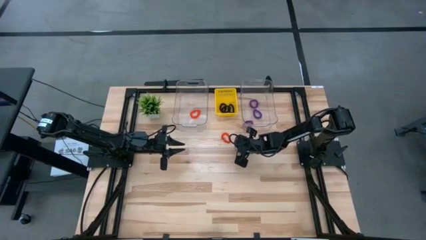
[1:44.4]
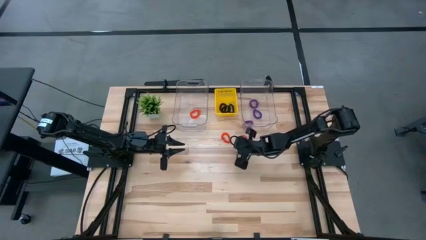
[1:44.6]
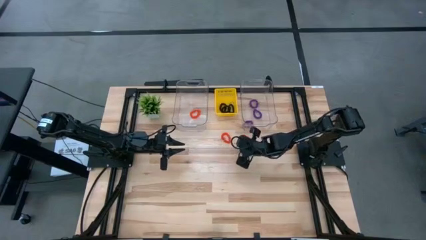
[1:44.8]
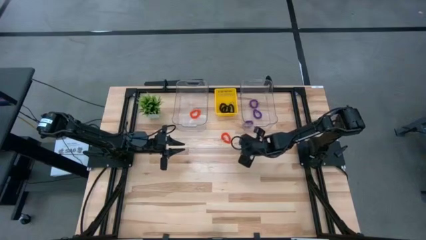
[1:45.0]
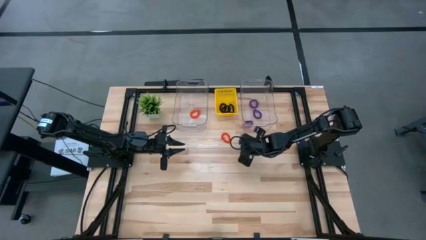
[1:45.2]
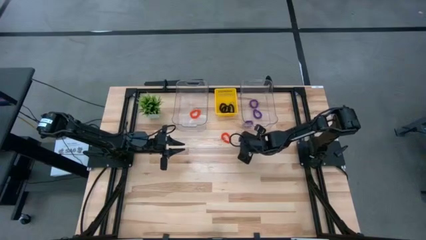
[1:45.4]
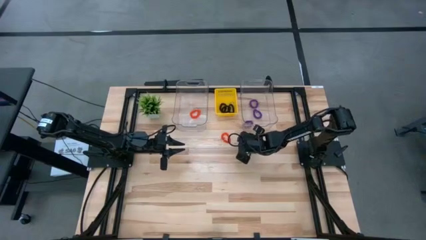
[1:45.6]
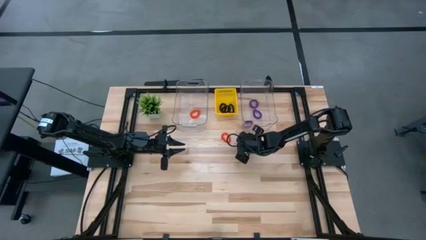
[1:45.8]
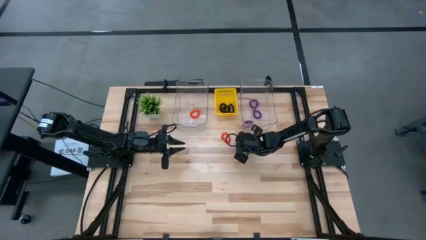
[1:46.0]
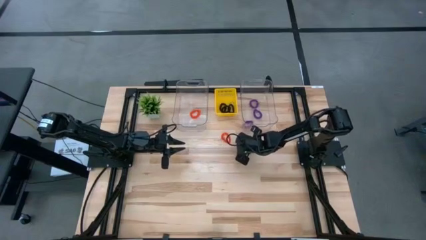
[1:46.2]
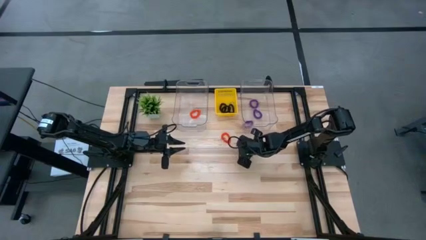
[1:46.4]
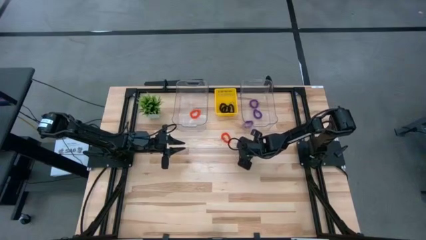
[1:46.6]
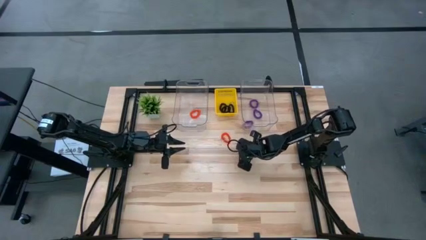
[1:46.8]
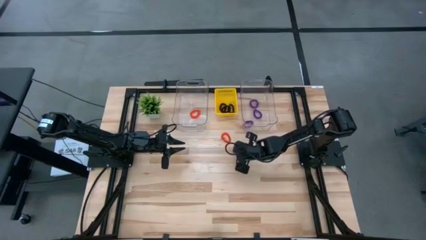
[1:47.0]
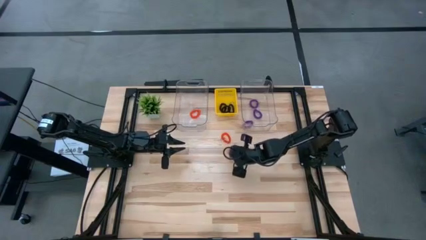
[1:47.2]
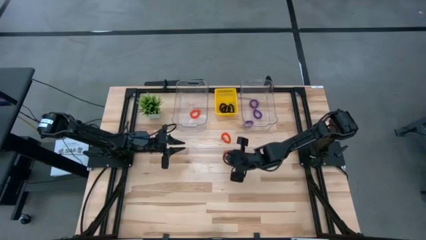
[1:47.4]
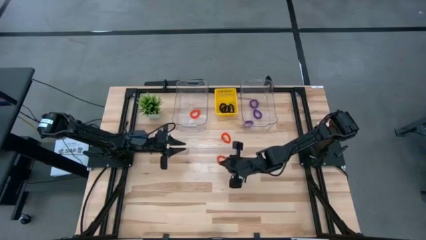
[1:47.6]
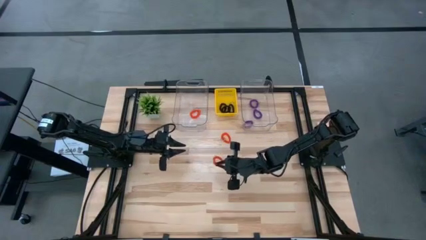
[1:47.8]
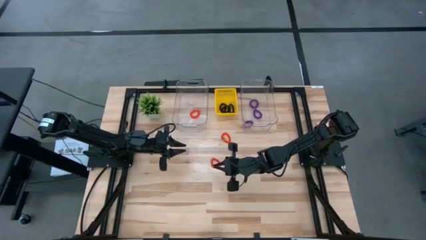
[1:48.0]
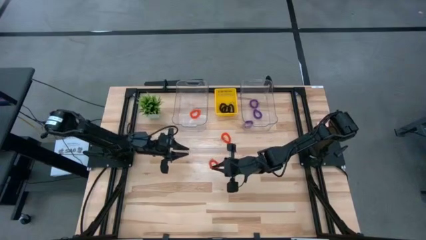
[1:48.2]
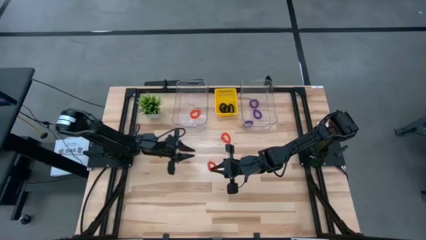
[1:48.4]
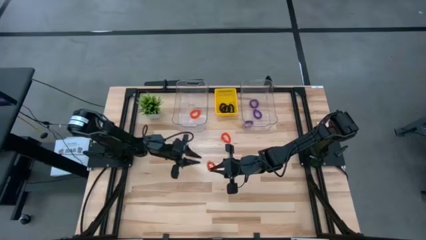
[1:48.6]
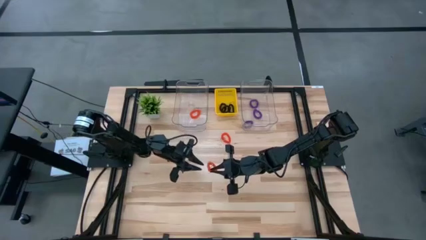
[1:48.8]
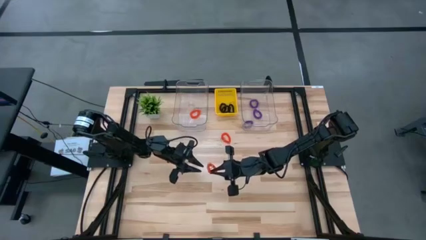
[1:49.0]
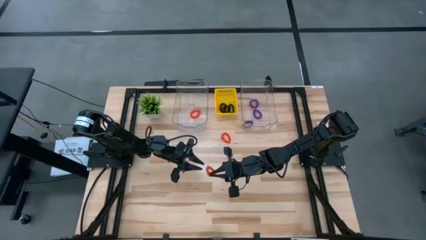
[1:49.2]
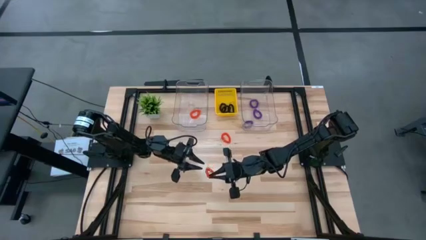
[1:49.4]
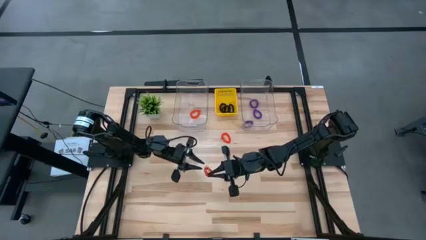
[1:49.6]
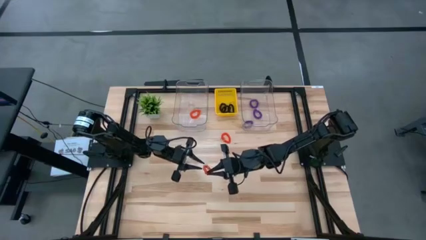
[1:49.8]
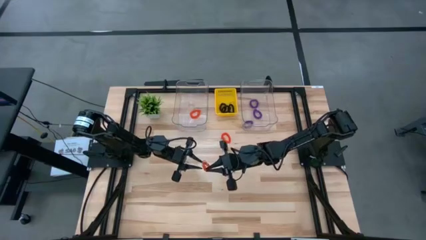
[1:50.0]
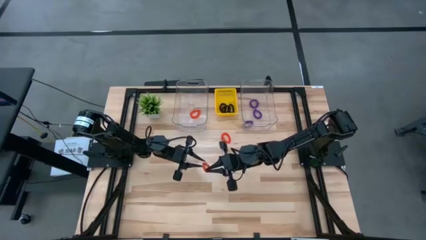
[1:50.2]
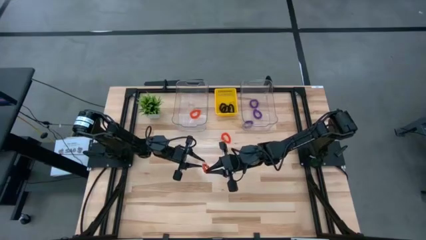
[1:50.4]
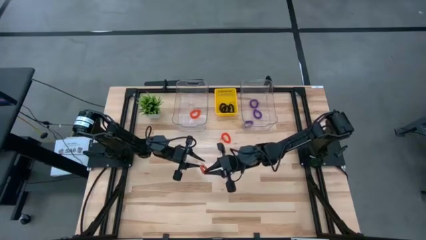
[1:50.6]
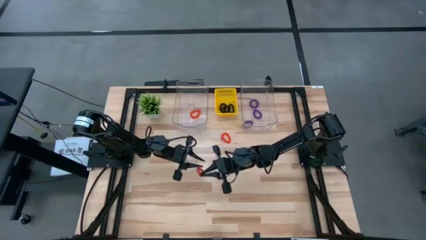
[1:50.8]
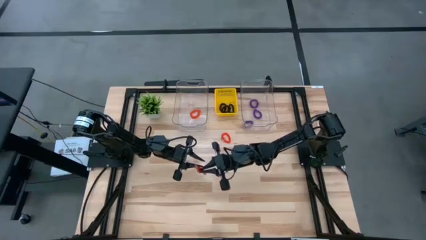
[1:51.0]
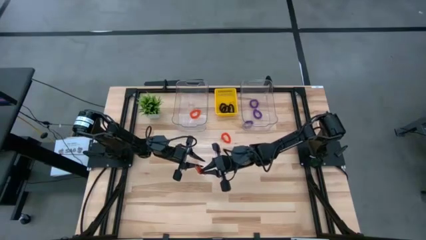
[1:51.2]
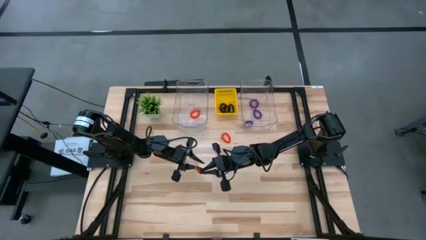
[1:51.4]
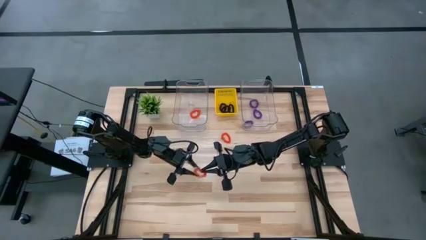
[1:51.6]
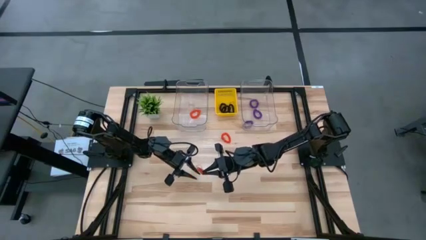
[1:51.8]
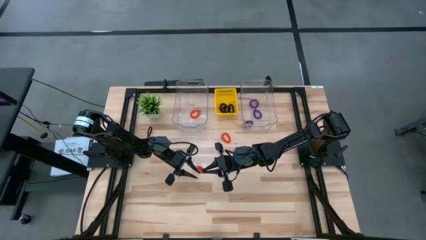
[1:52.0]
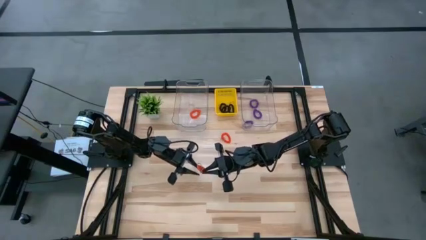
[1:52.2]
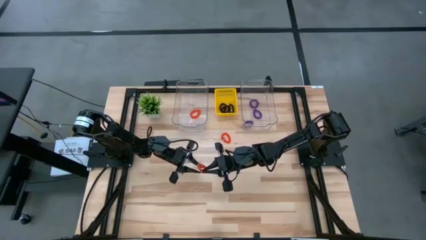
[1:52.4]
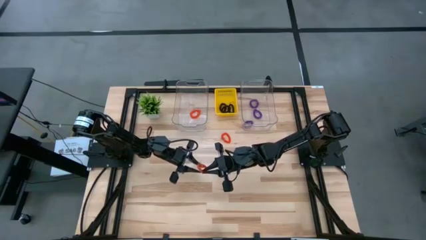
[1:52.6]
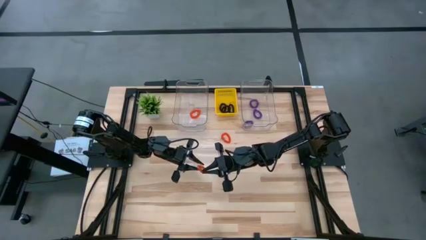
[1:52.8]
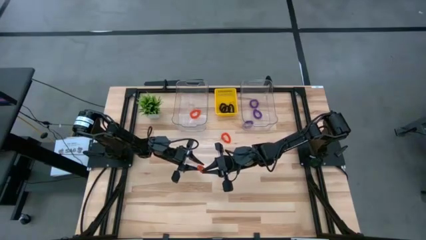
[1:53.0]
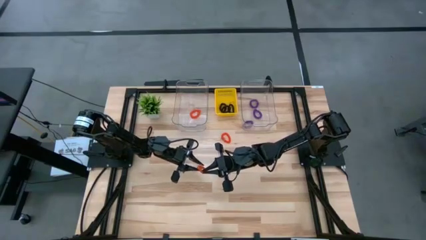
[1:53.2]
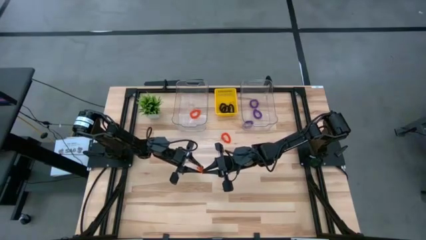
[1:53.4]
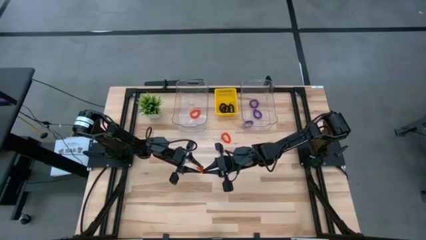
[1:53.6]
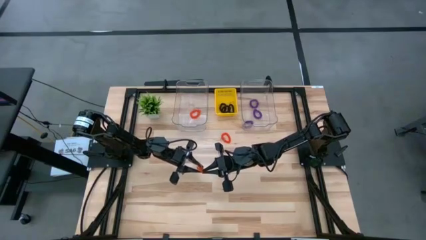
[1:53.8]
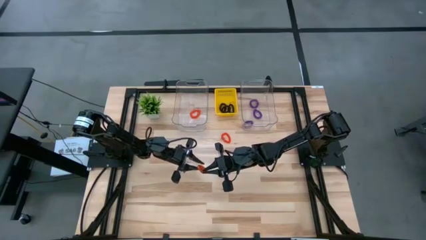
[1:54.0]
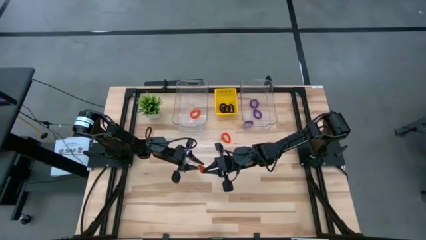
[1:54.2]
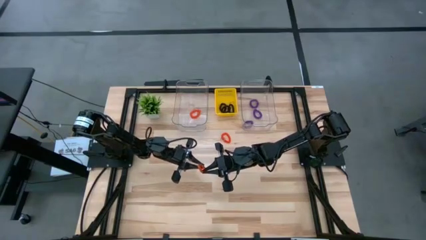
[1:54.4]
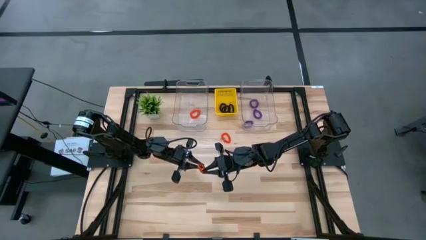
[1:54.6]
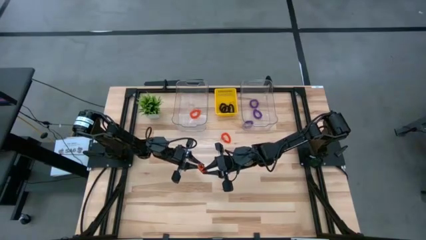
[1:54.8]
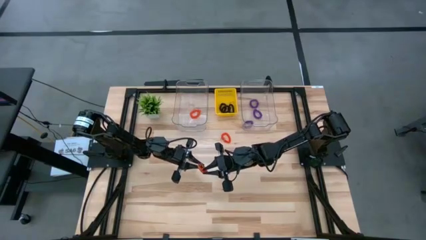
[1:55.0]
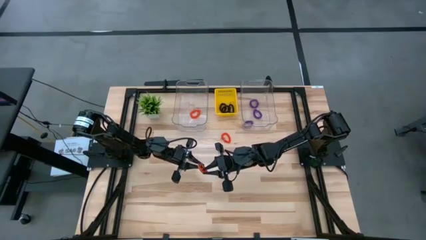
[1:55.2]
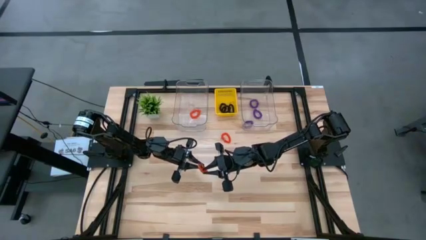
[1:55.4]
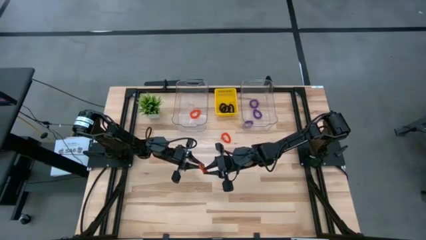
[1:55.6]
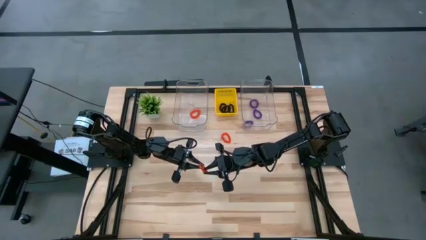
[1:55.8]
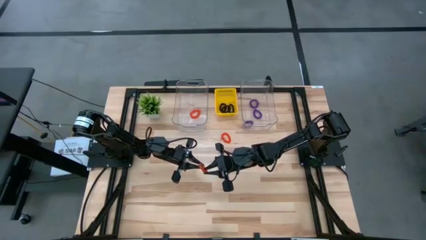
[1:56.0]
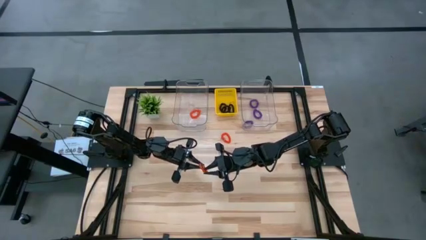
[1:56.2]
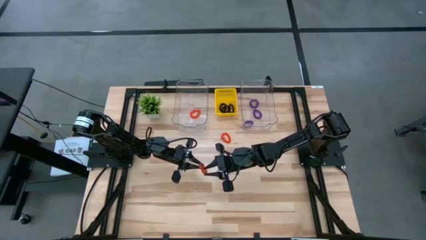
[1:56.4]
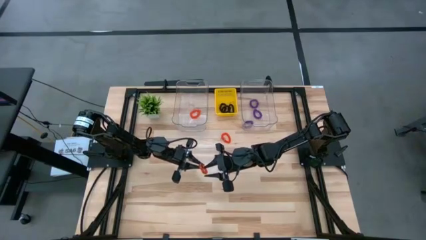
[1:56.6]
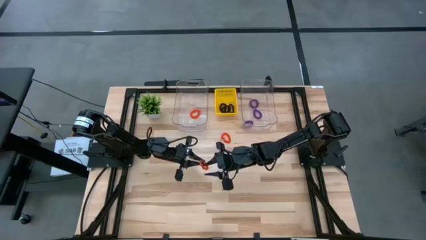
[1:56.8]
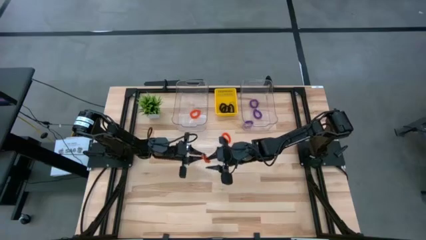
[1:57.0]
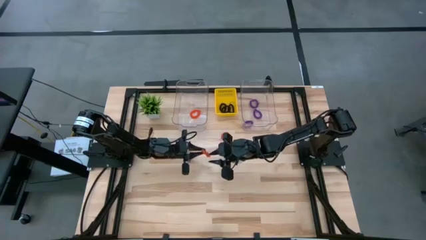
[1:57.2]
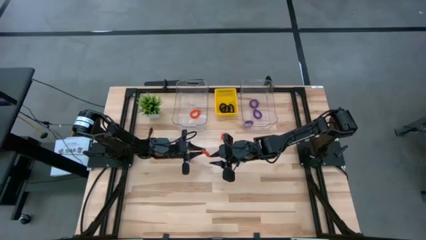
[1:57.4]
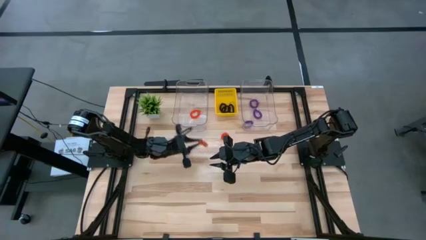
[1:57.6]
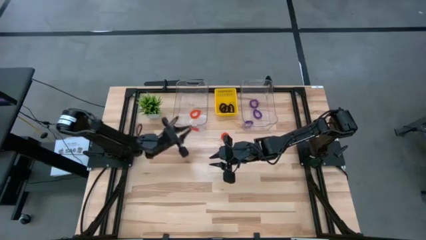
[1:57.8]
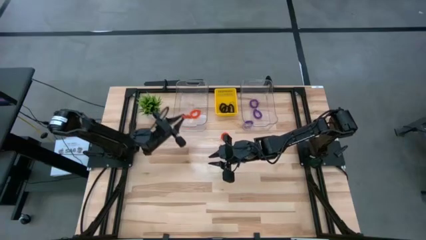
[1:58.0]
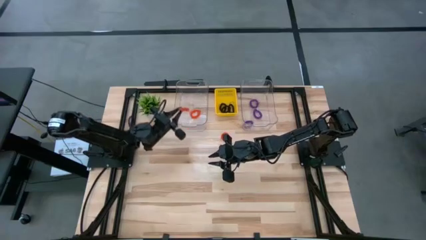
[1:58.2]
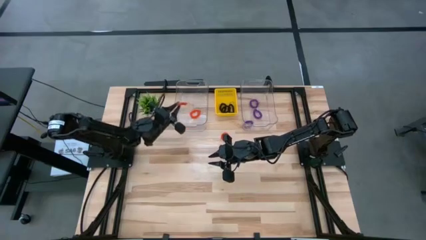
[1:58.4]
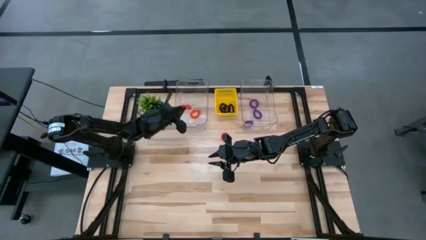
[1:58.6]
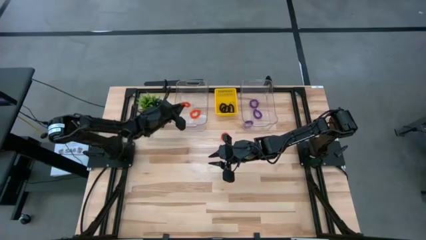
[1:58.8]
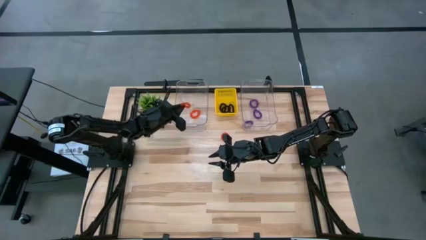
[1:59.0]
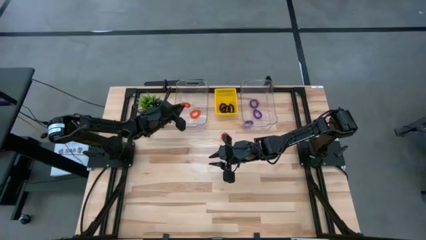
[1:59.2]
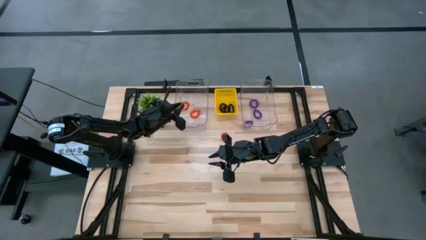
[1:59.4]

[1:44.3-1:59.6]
Task: Sort spring keychains
Put the right orange spring keychain into the left transparent bin

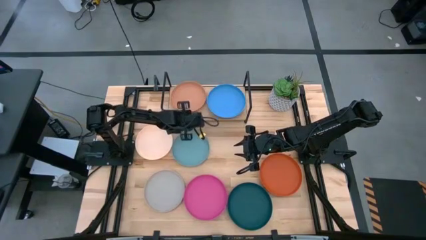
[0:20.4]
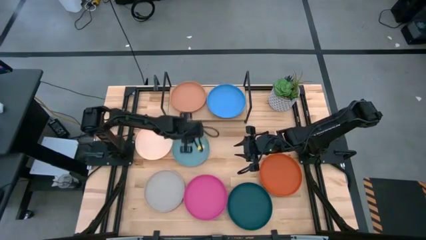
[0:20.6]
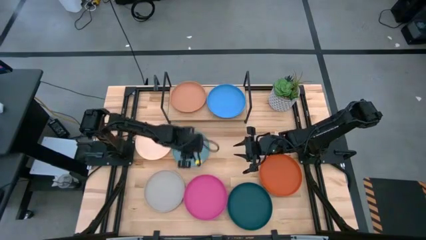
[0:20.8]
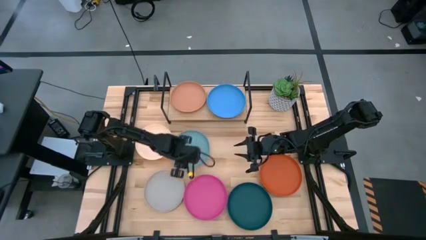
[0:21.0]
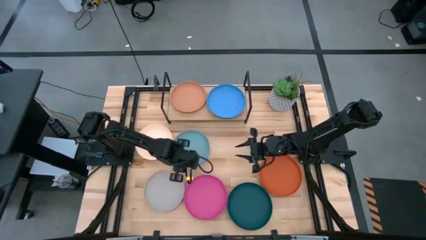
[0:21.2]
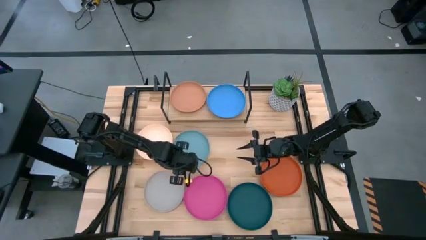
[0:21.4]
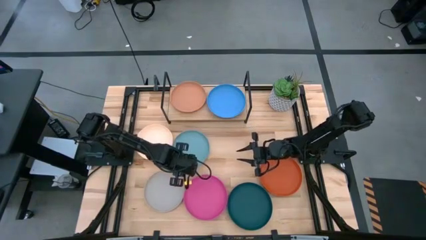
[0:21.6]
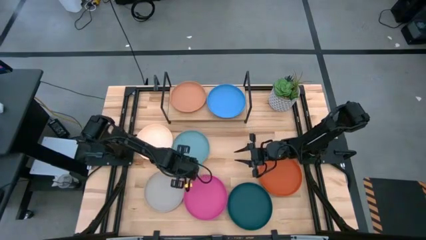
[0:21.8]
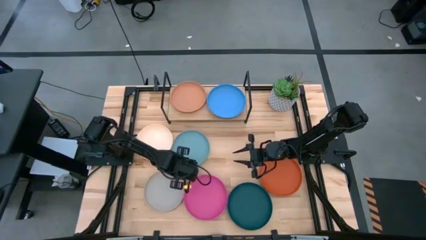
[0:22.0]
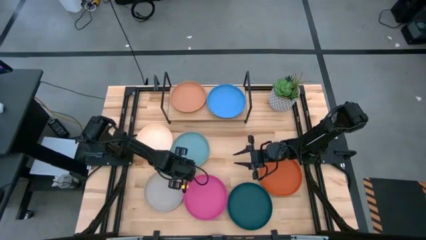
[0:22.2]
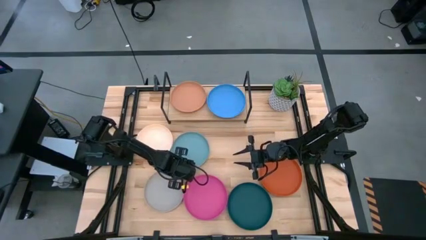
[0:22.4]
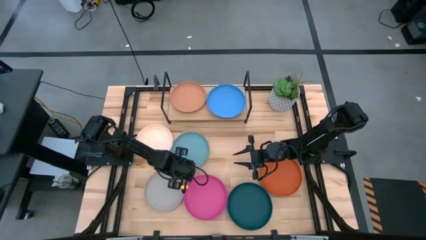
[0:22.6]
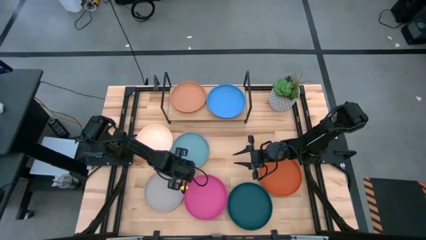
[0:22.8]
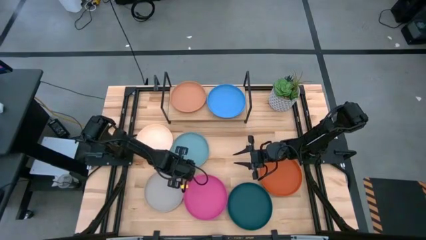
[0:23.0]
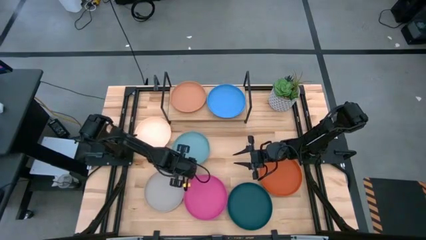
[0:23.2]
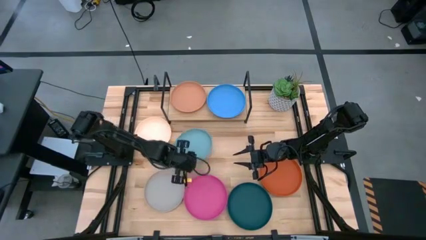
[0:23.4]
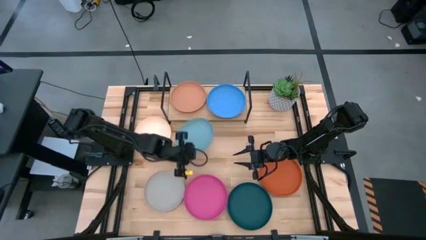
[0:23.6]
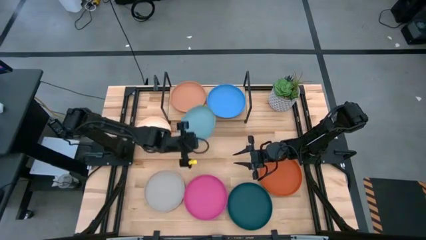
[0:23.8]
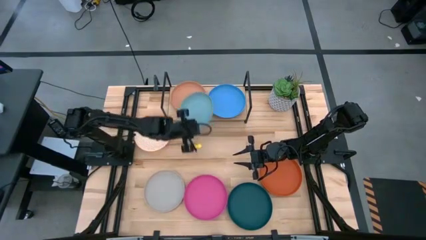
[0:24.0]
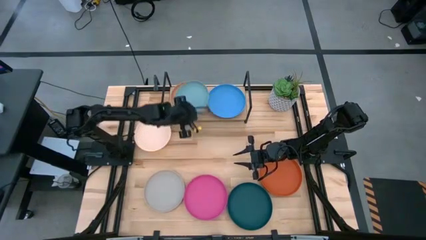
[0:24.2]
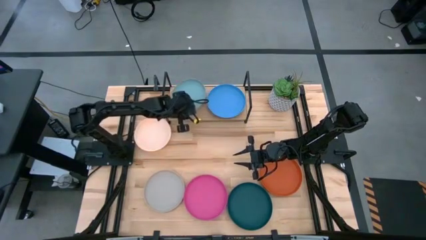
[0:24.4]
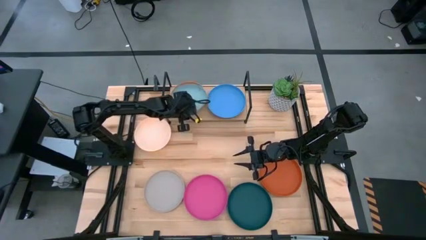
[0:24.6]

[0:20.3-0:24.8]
Task: Place and stack plates onto a shelf
Stack the light blue plate on top of the brown plate on the shelf
